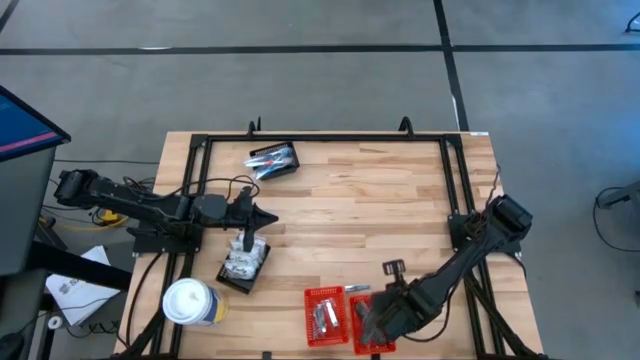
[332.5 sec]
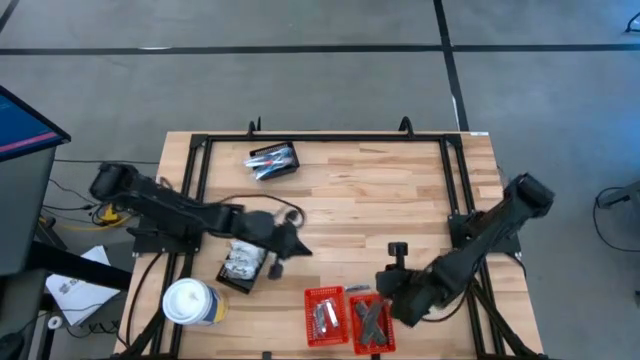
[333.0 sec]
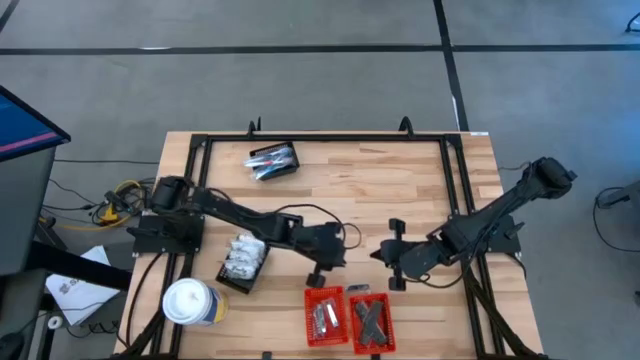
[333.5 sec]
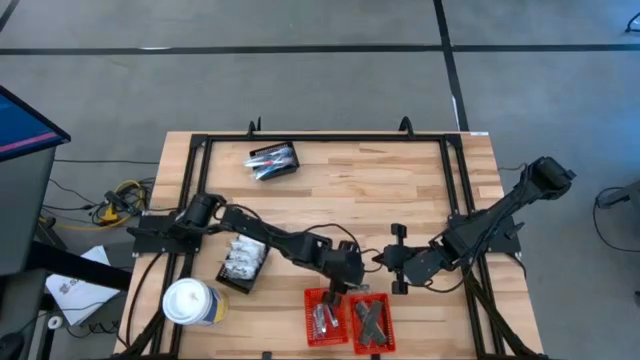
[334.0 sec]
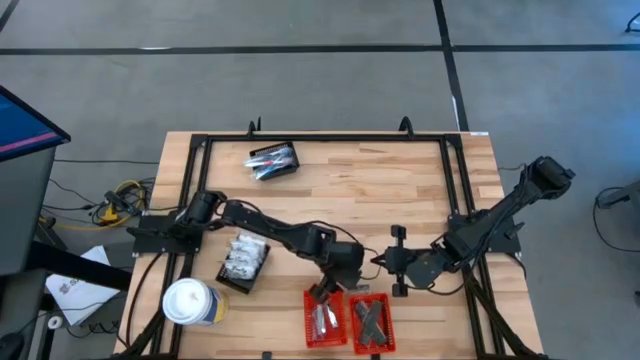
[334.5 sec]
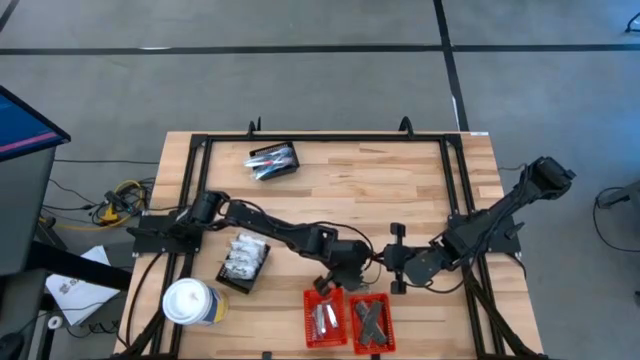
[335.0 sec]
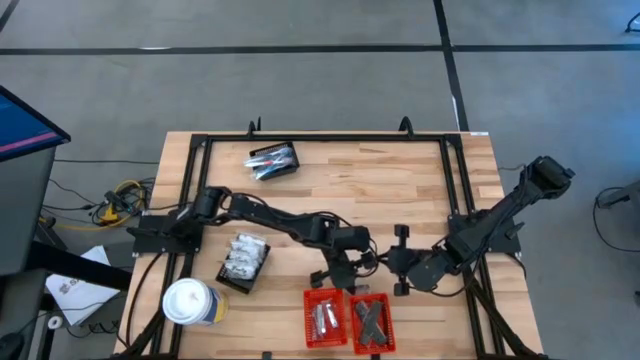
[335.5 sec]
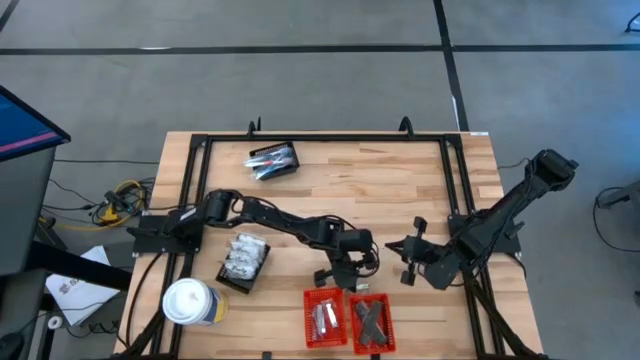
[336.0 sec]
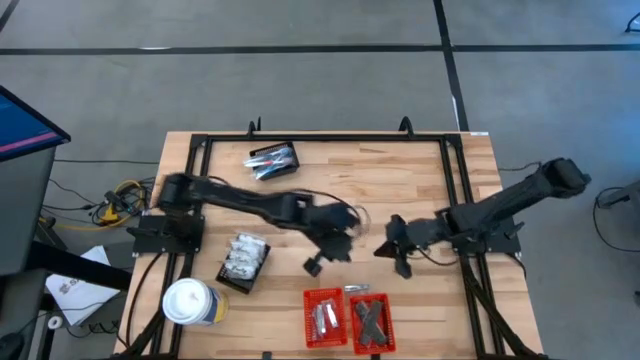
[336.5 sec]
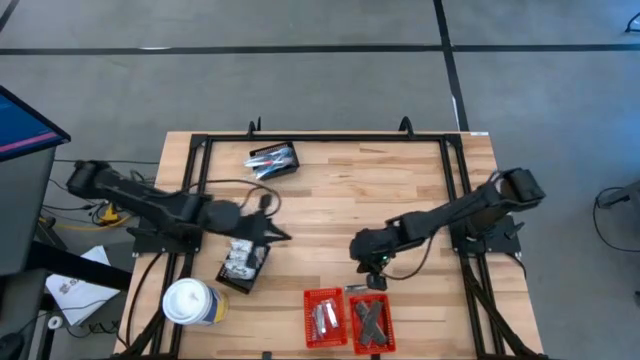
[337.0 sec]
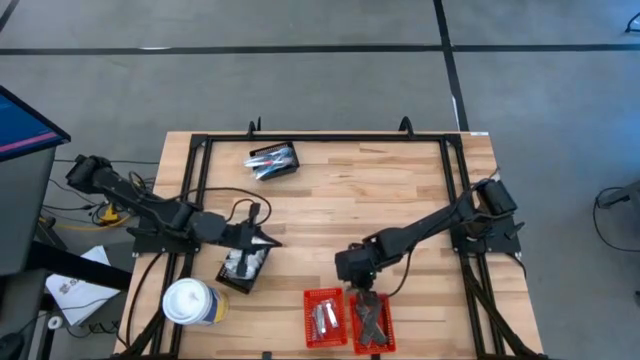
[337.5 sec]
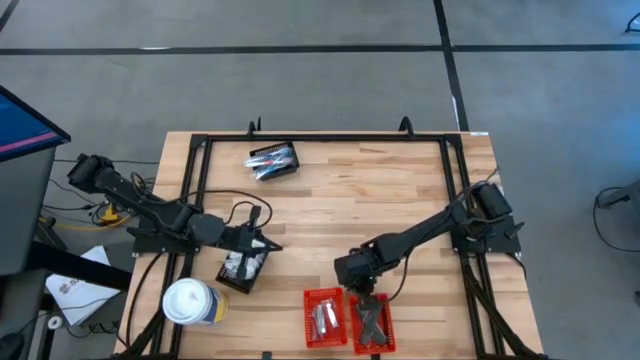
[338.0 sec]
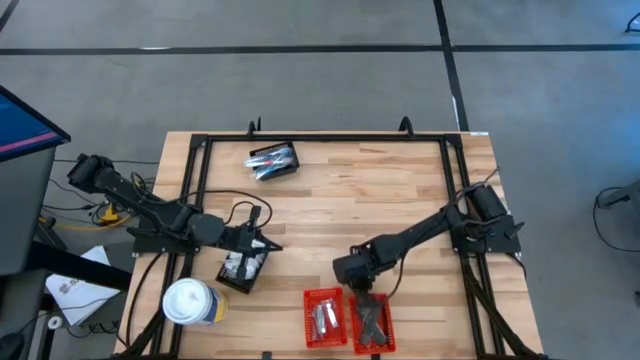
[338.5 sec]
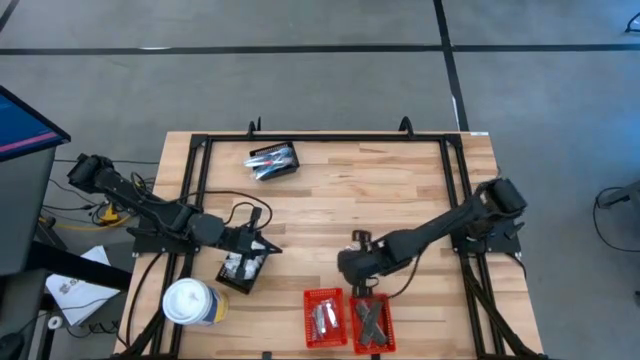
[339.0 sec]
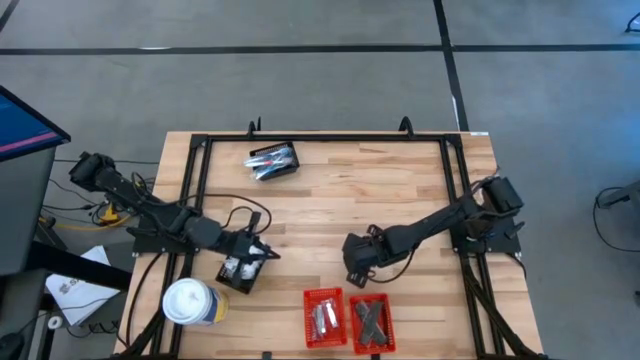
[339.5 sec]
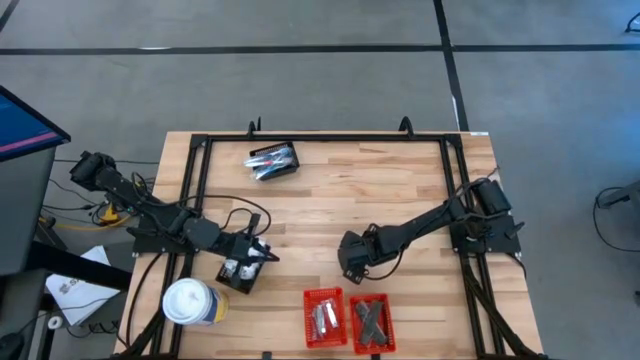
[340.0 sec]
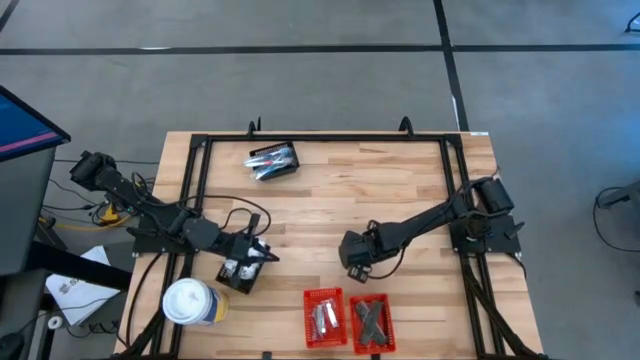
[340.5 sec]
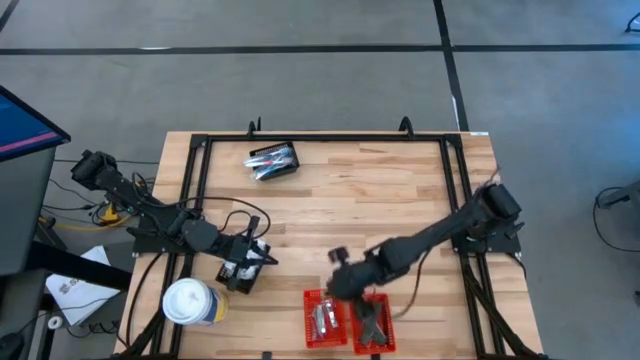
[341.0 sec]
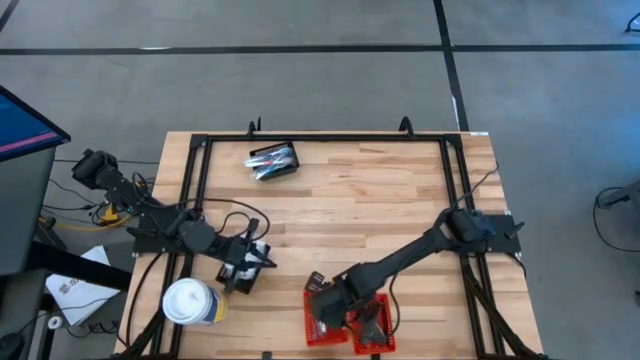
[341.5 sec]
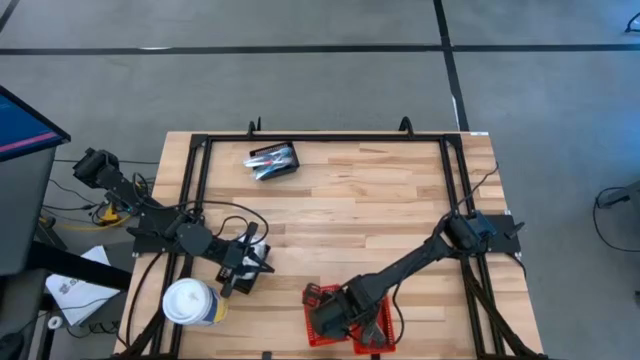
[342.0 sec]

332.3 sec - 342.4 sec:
Task: Pick & Place Travel size toiletries
Put the nail cutter into the left red bin

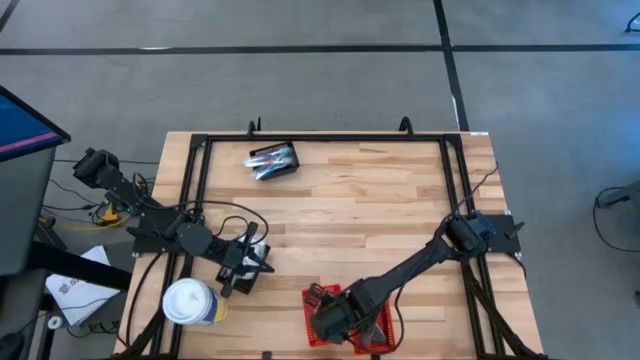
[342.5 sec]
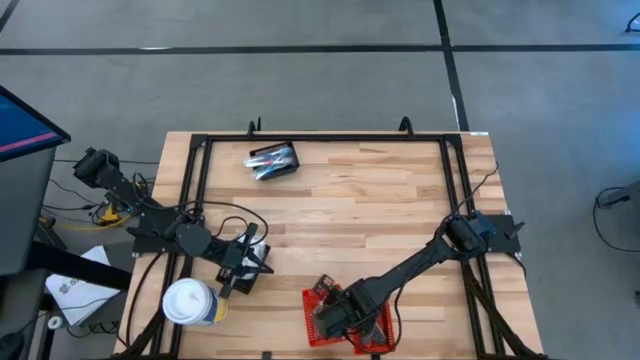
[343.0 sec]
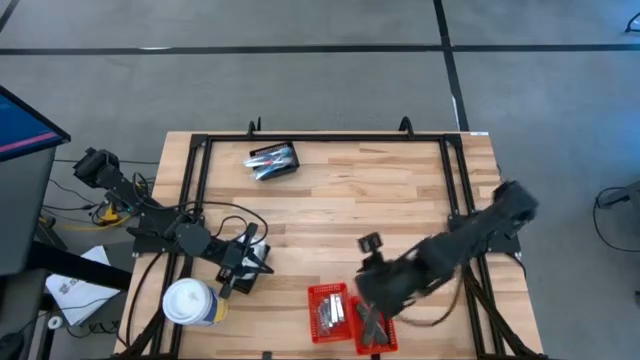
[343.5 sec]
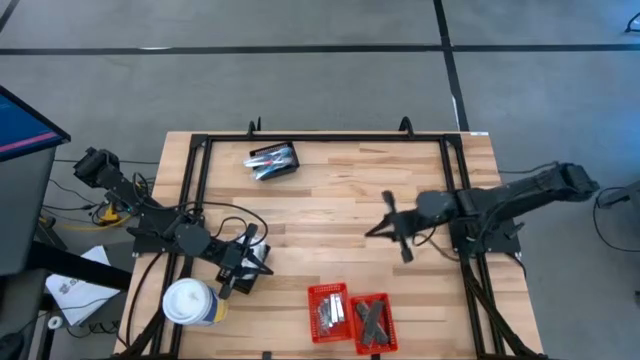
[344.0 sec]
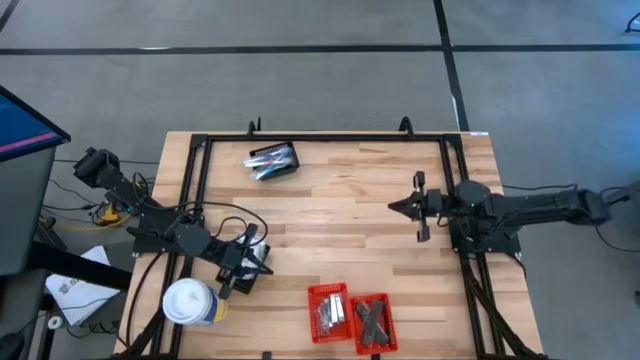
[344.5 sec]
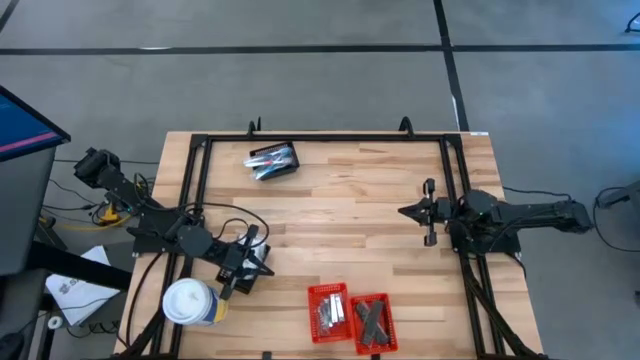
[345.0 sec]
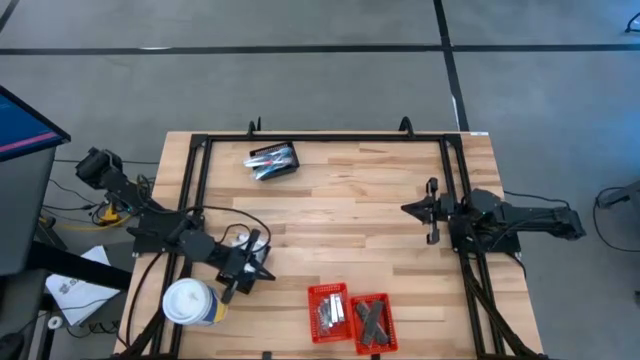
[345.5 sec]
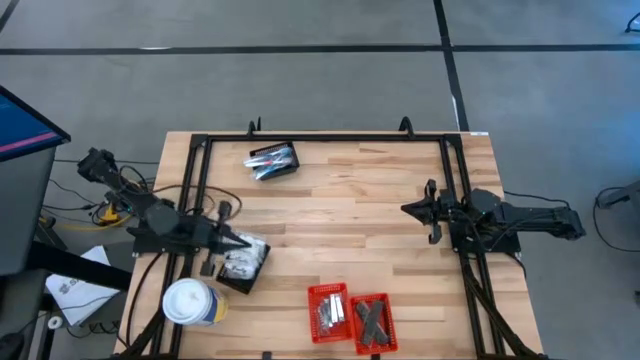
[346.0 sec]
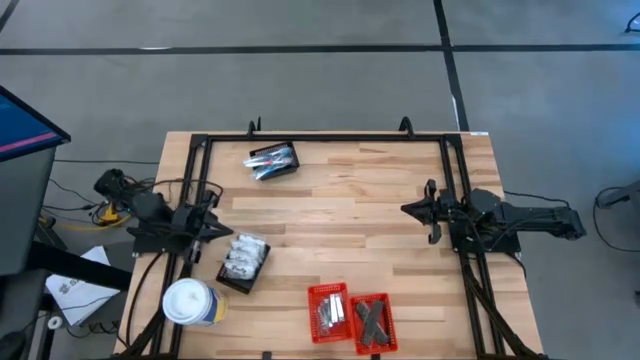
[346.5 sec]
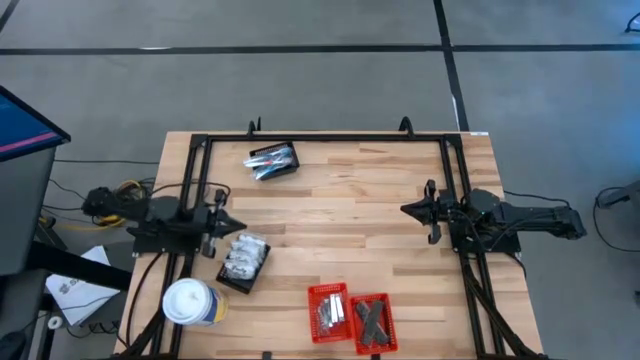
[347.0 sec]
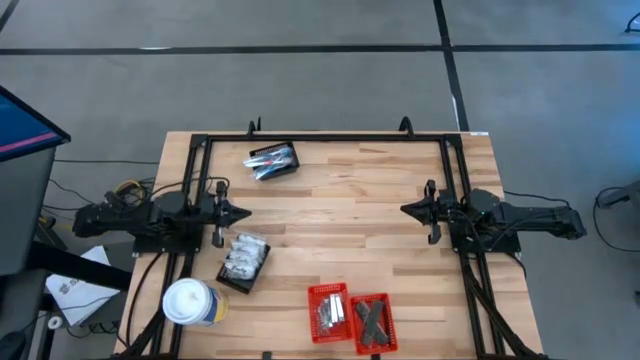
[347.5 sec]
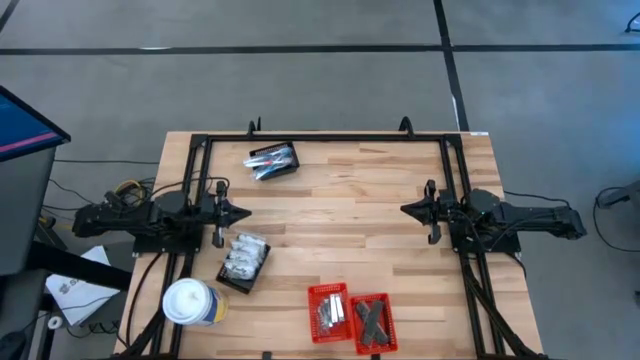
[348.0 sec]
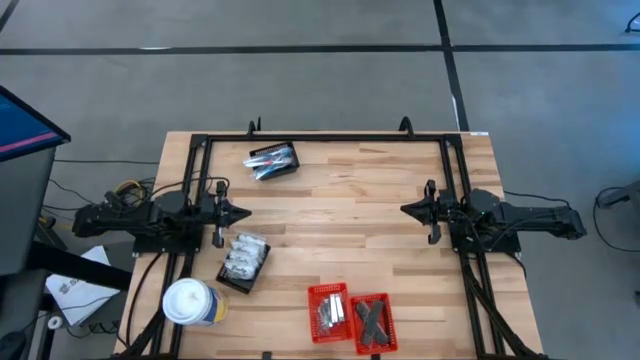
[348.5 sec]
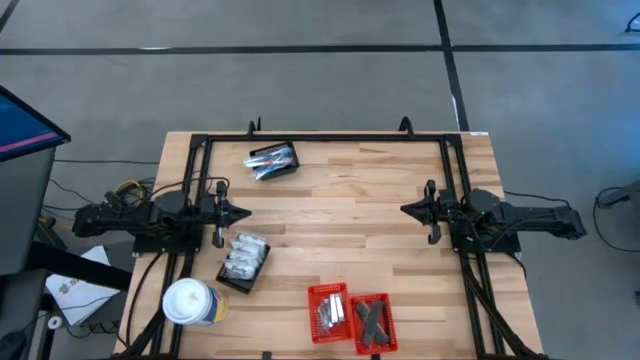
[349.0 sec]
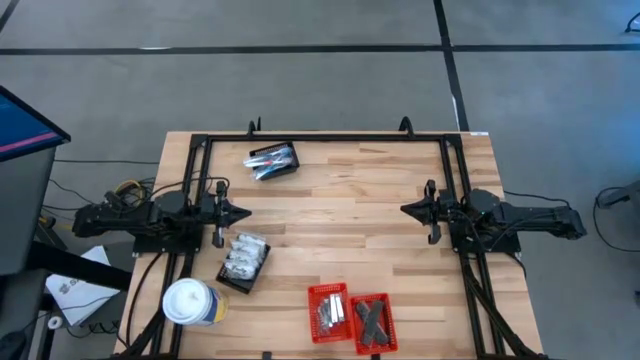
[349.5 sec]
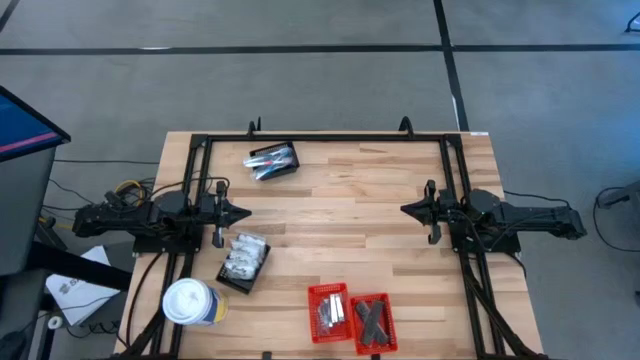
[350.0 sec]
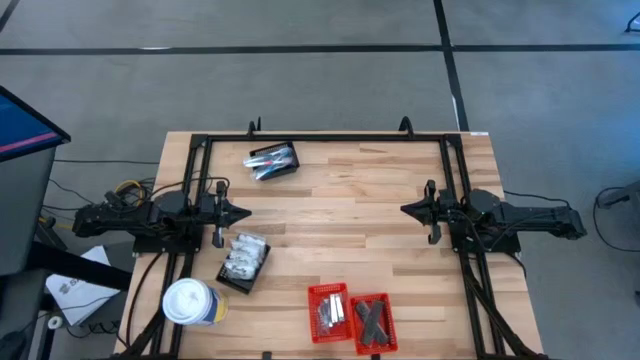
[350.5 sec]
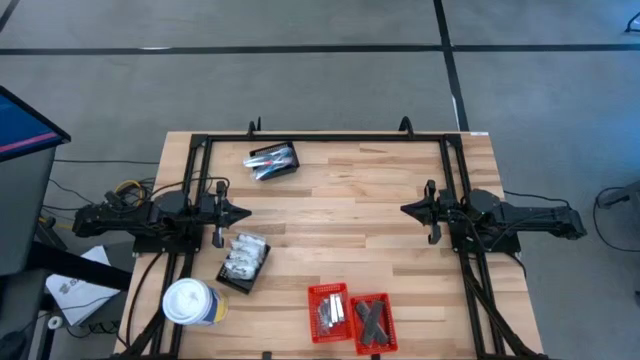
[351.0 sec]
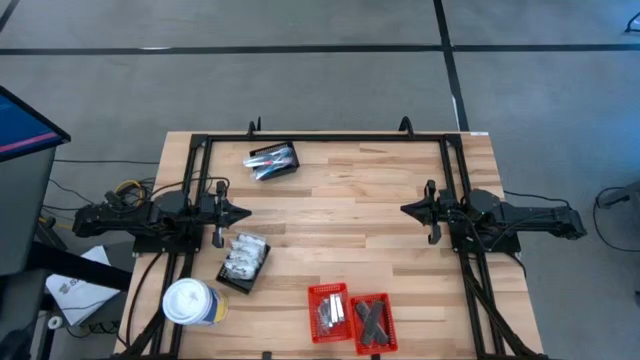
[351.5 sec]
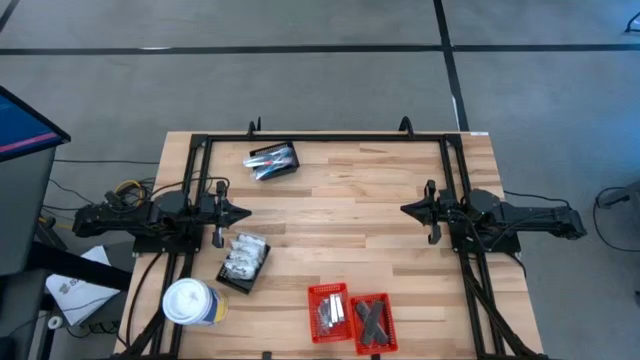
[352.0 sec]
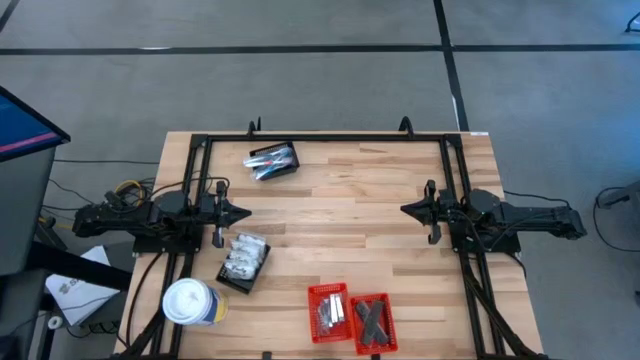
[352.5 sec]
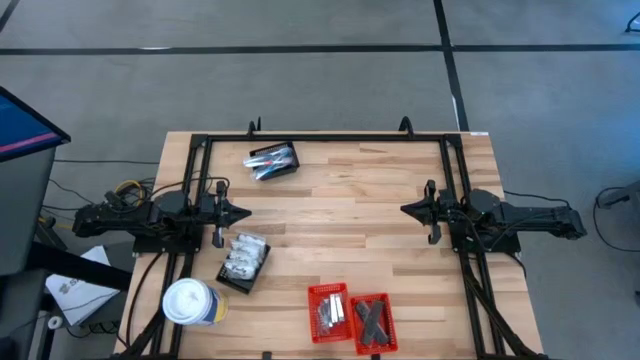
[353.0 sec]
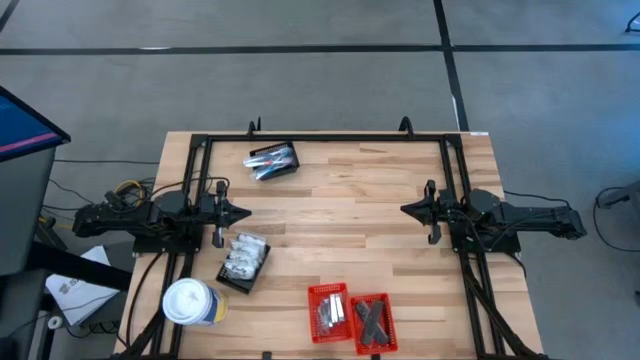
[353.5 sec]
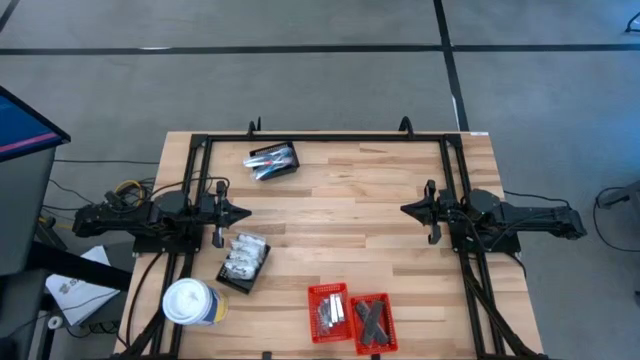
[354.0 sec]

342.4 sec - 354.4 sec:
Return to Home Position
